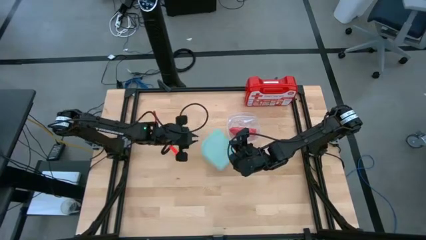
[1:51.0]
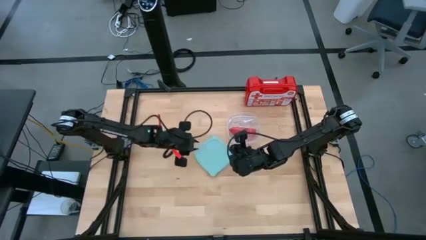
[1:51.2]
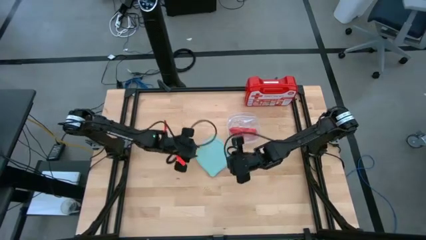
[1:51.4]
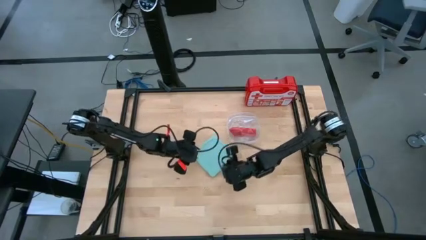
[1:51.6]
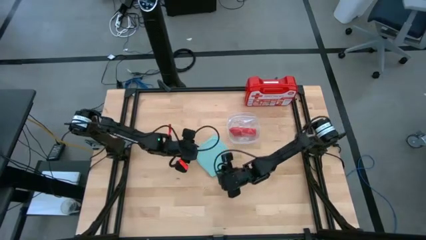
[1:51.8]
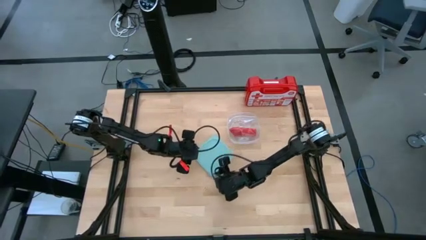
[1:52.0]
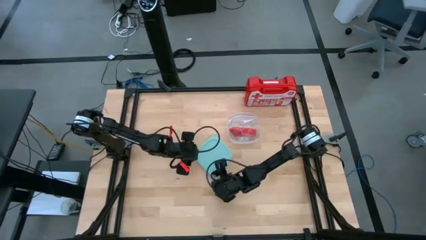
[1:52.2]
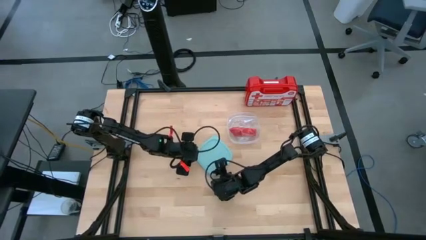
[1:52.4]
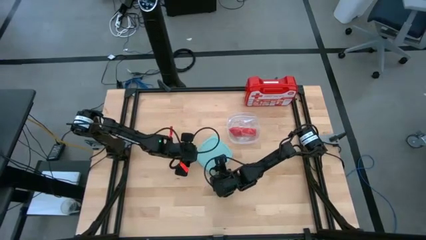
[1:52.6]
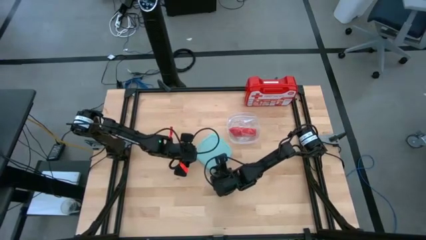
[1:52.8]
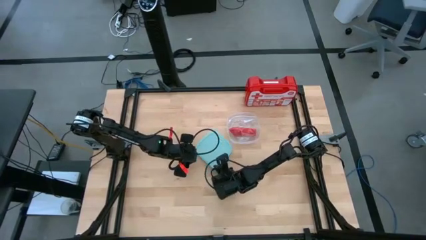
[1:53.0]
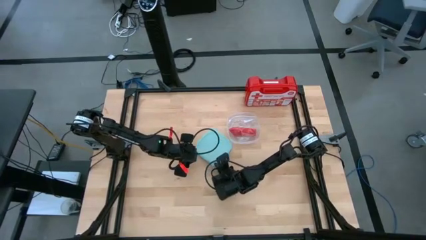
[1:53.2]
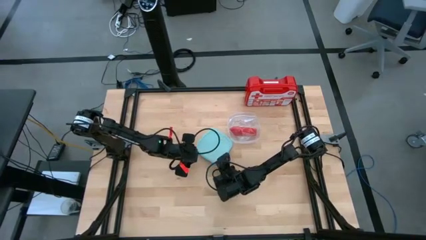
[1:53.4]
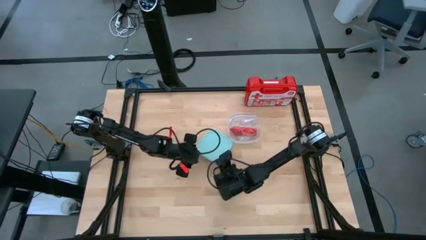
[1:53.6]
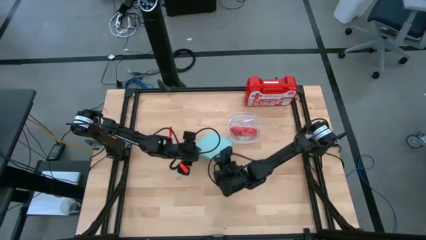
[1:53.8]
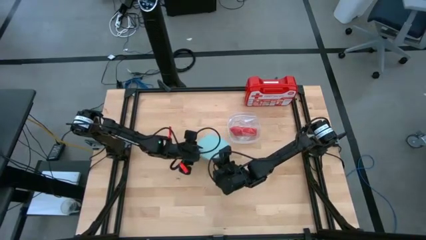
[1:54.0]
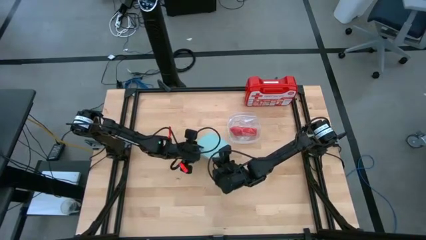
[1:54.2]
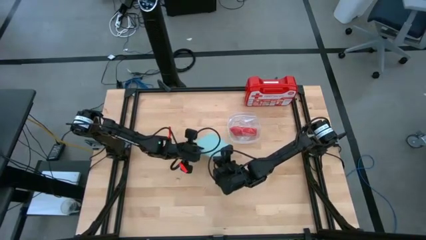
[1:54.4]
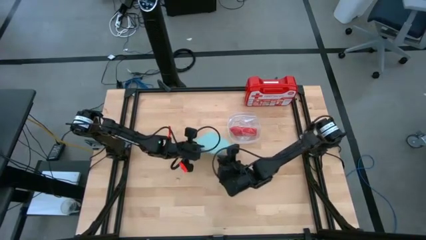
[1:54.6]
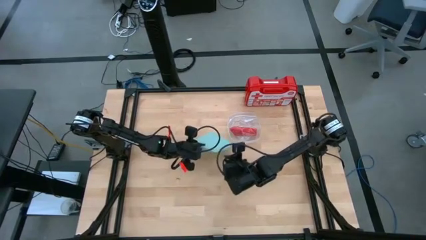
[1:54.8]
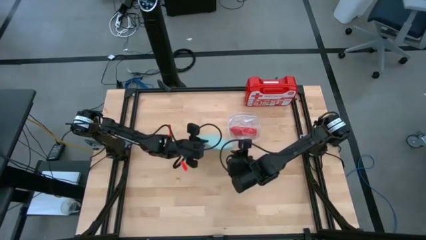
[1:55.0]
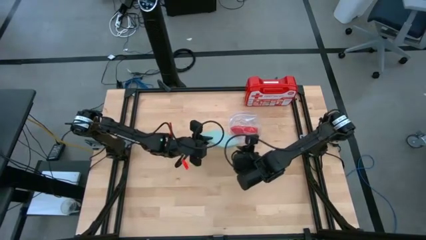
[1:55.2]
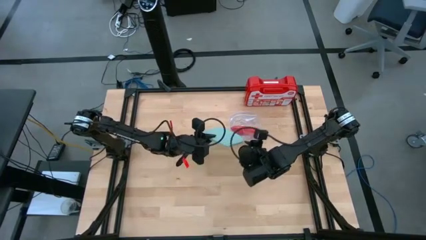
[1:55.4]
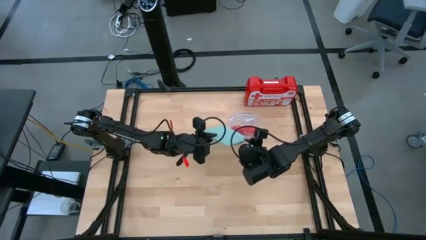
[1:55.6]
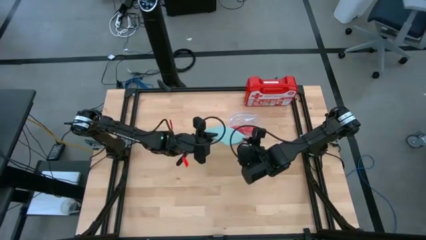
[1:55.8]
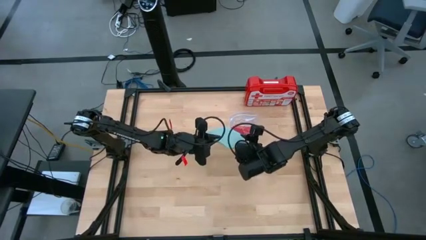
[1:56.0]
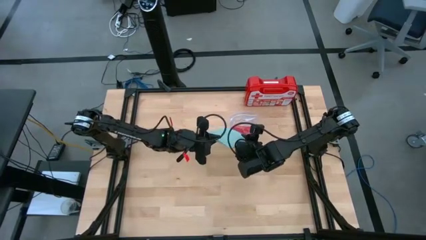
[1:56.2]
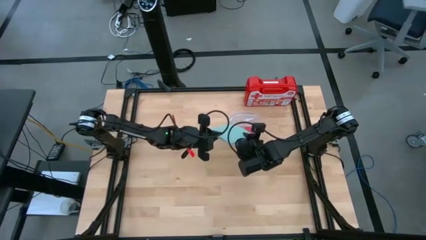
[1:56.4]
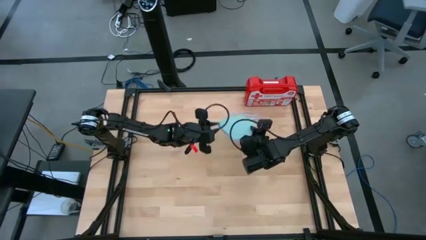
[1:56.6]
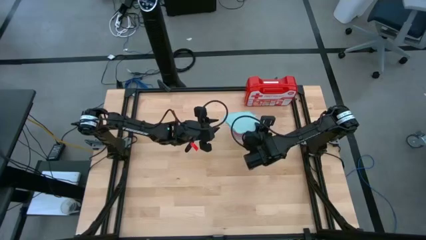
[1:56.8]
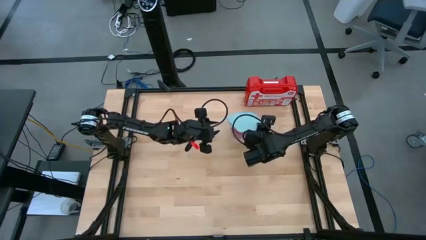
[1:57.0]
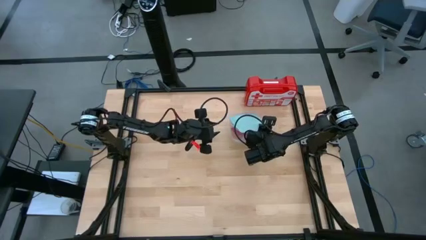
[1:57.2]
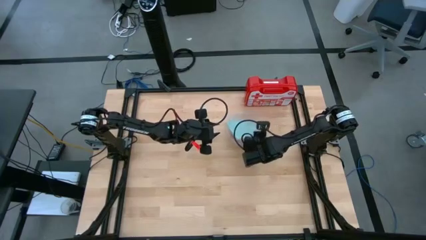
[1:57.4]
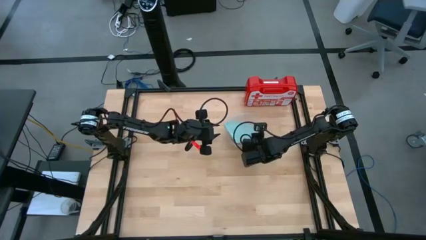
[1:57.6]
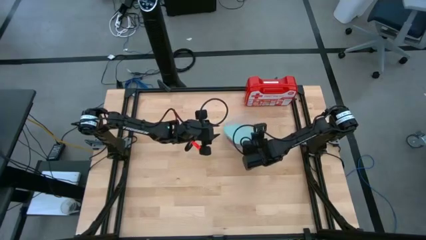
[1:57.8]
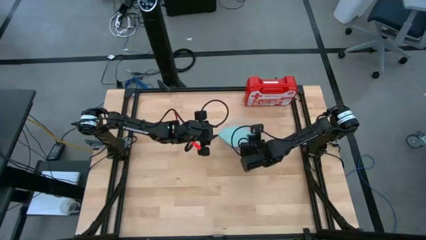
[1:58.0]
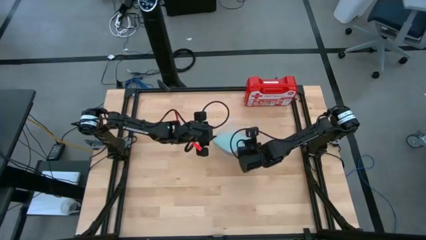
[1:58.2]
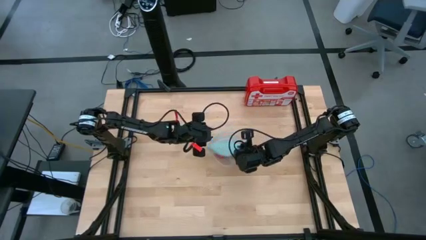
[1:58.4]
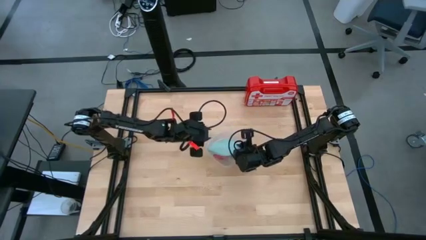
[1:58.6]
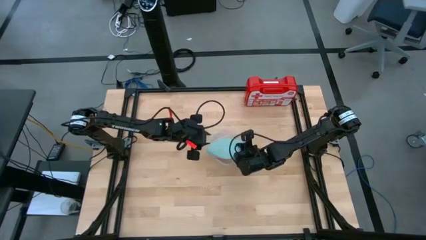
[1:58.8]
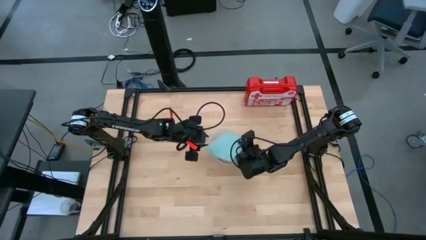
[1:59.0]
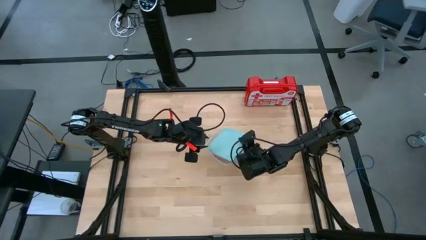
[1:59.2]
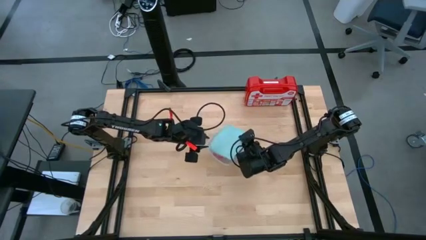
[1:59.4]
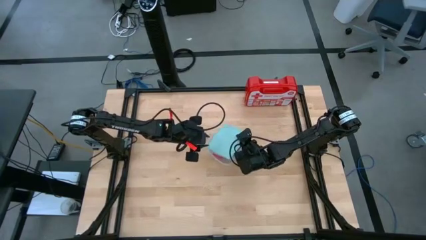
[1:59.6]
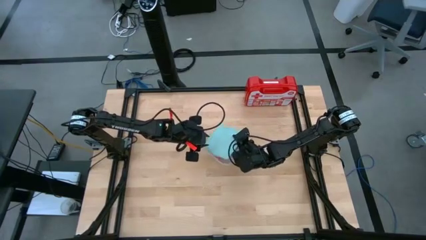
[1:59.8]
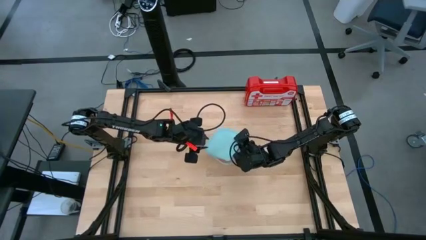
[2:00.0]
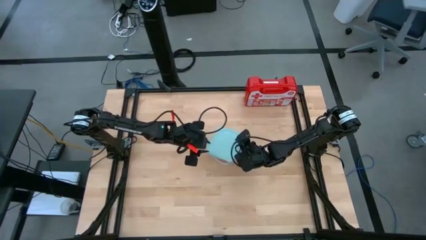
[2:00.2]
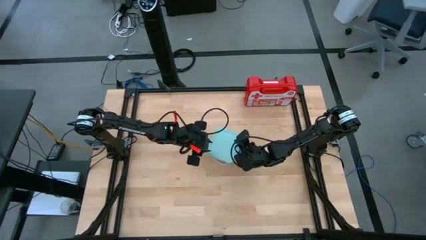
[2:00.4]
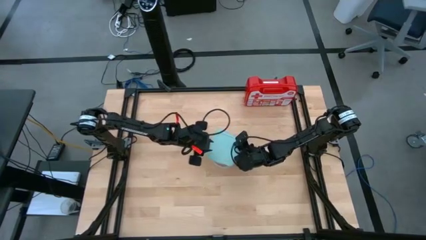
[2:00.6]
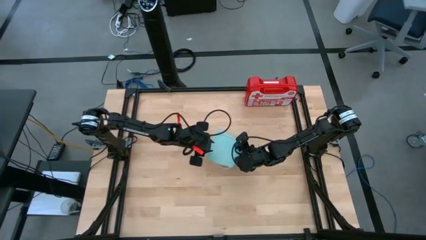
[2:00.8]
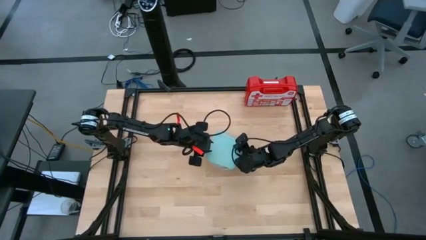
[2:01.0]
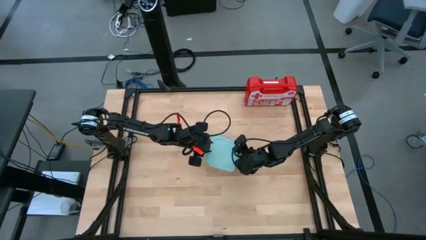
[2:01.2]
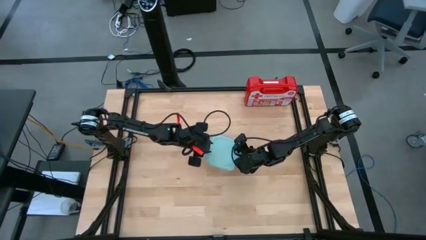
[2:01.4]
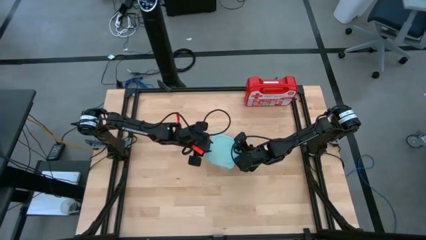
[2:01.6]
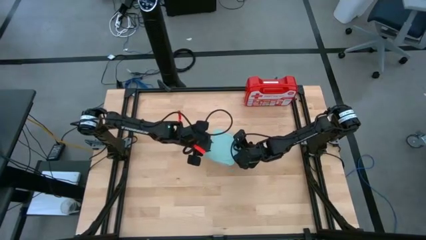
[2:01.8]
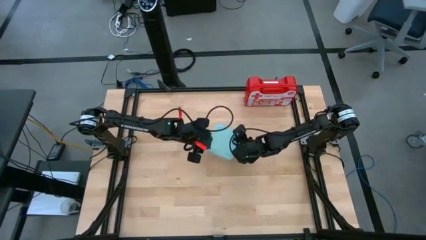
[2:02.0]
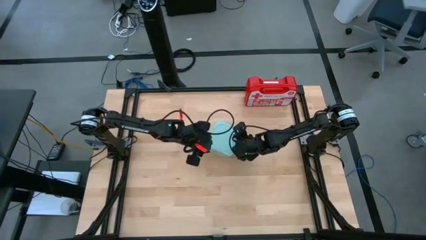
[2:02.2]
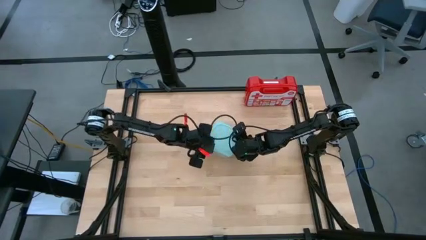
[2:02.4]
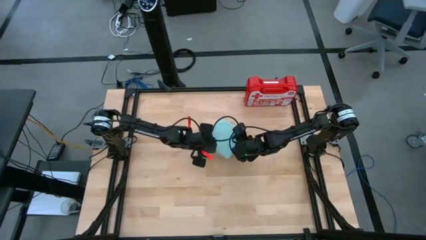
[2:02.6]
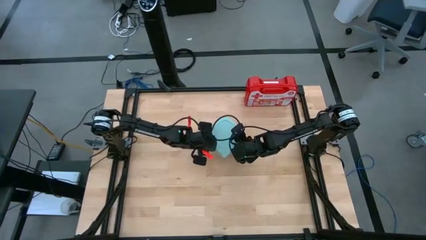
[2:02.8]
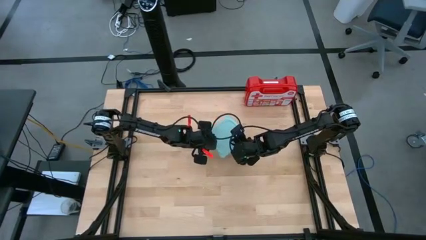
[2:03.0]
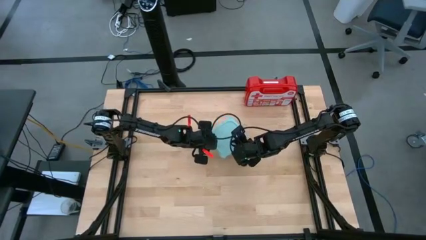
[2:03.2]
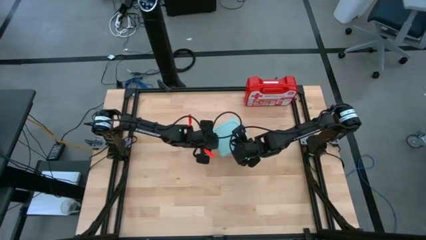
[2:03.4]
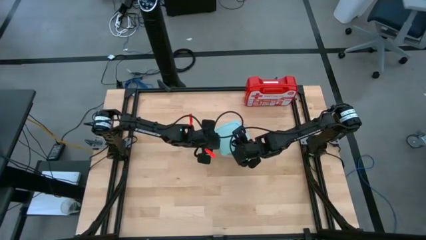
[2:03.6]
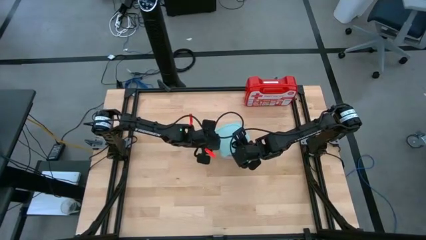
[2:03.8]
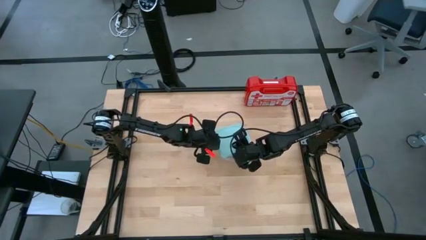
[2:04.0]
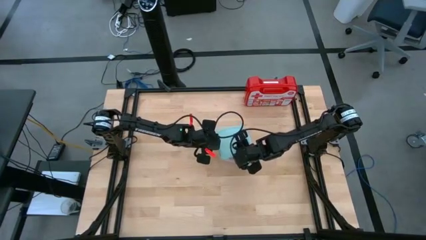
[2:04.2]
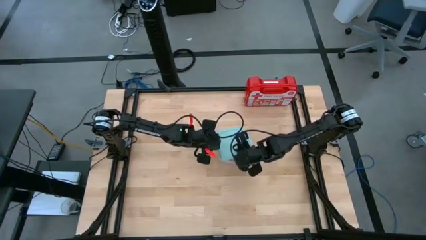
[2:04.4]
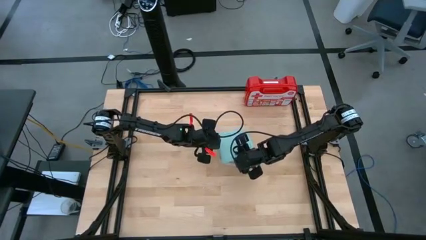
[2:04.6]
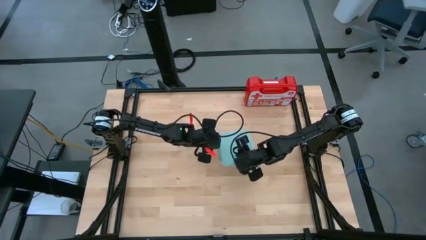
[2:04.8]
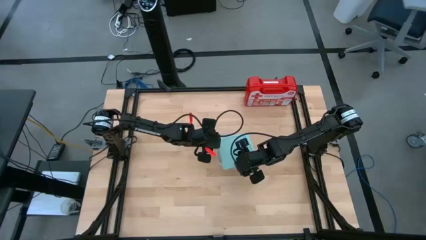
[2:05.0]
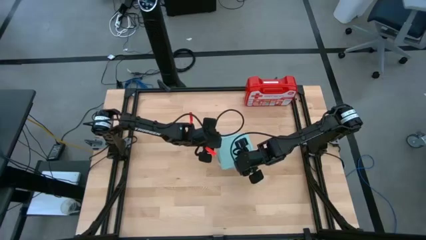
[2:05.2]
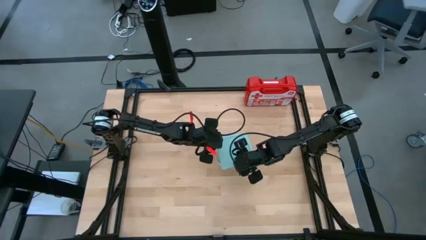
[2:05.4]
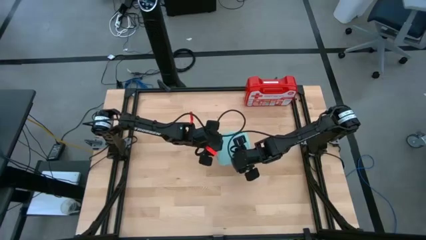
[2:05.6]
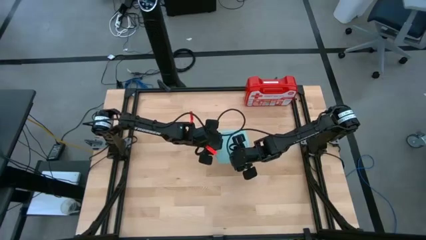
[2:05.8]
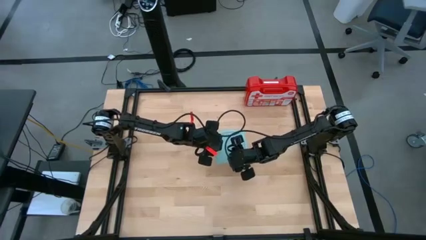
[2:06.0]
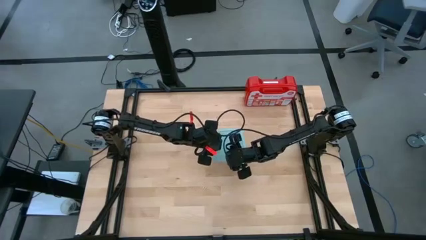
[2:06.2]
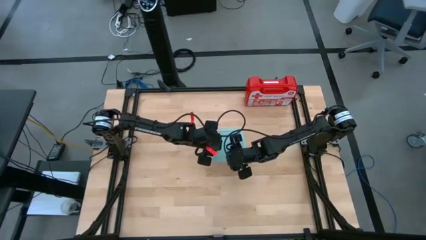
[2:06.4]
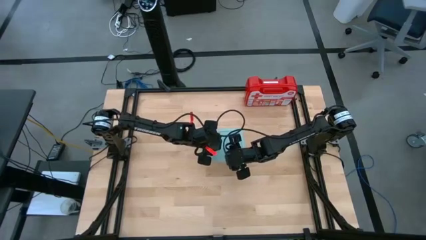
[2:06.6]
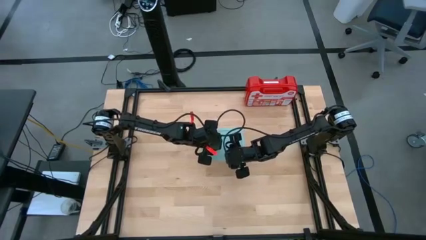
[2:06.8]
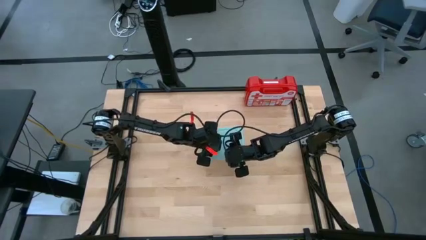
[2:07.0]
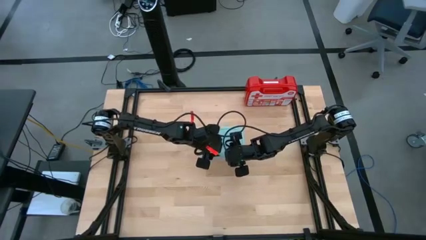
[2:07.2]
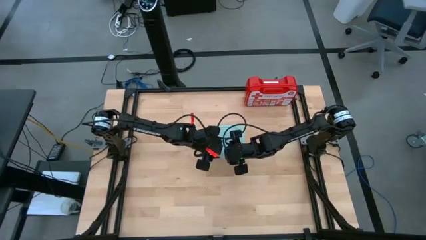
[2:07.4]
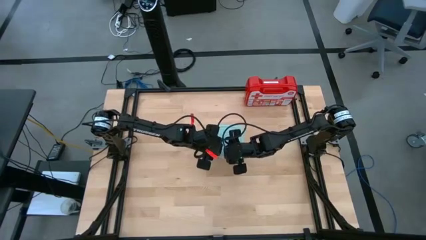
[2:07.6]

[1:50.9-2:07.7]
Task: Roll bandage
Close the plastic container

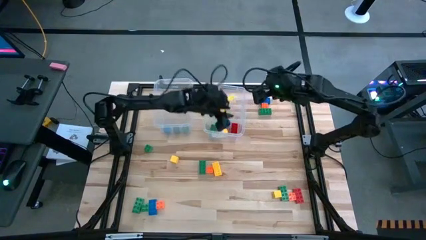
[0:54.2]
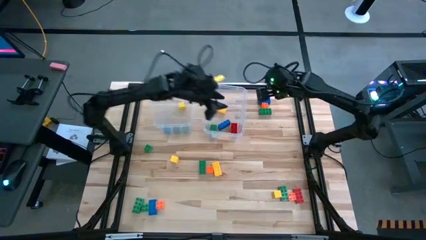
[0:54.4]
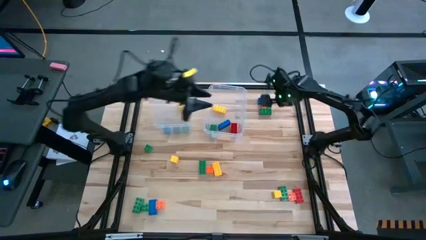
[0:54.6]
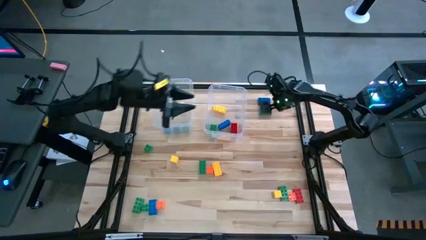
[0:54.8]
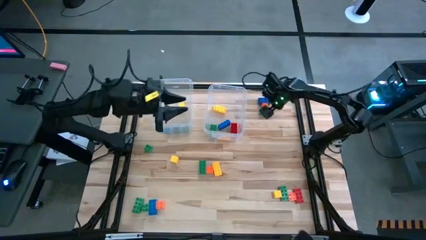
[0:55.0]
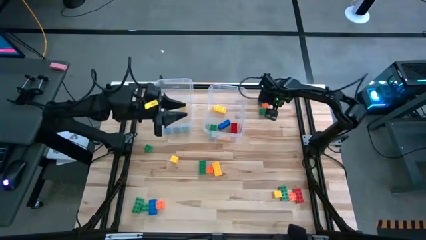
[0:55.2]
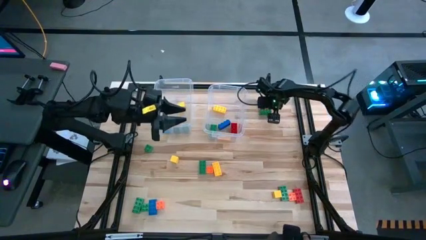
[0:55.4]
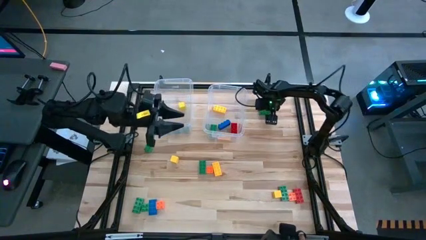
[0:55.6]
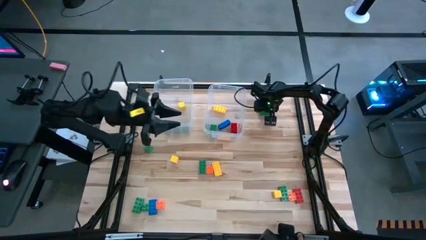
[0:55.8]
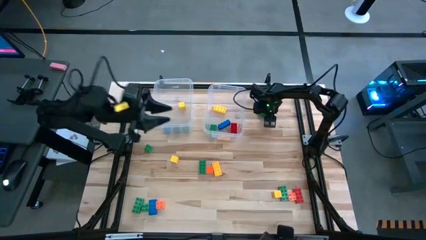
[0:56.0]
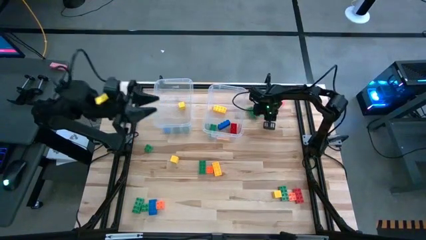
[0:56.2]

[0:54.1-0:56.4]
Task: Sort blocks by size
Put the green big game piece into the right transparent bin
